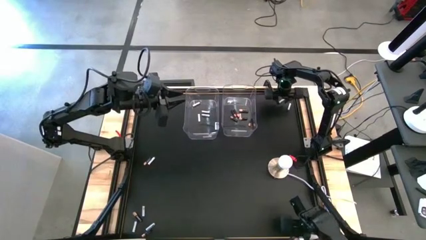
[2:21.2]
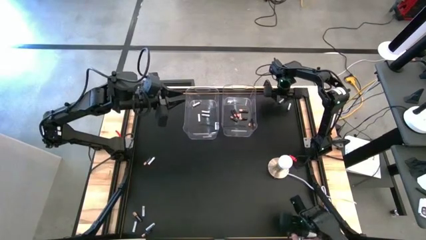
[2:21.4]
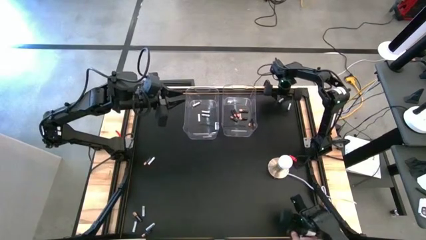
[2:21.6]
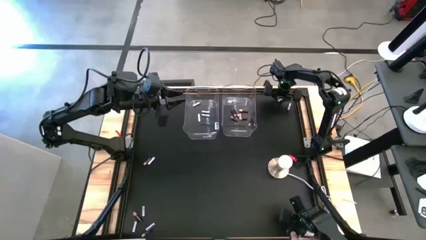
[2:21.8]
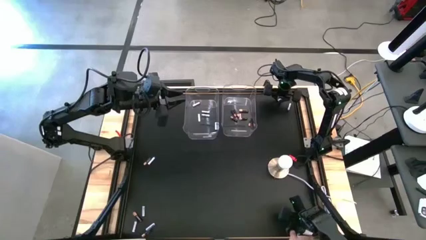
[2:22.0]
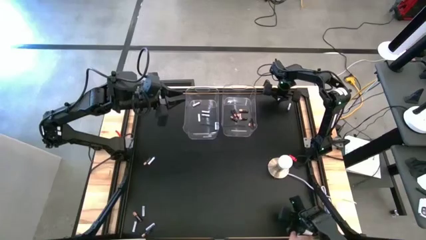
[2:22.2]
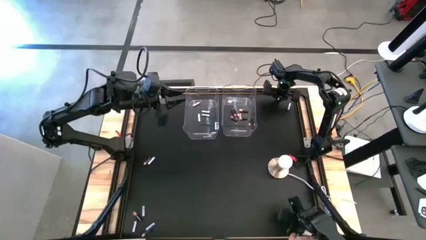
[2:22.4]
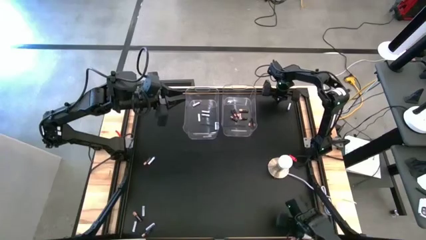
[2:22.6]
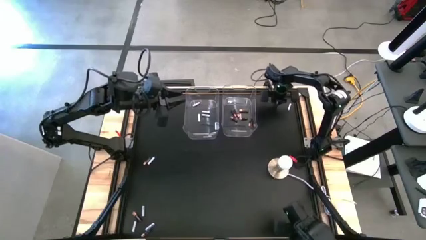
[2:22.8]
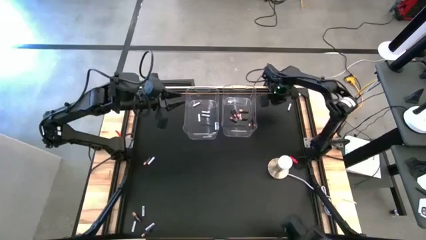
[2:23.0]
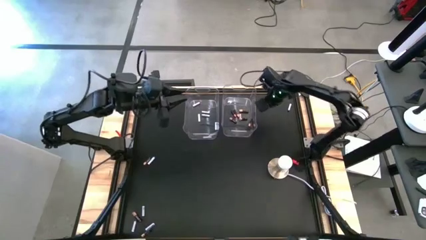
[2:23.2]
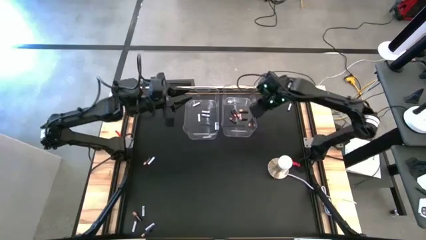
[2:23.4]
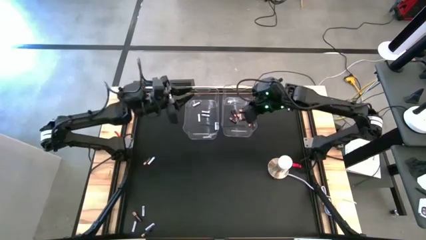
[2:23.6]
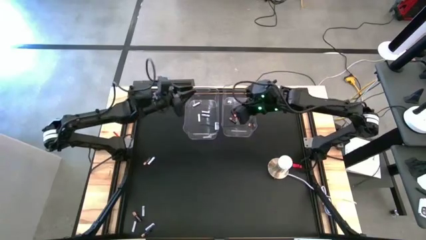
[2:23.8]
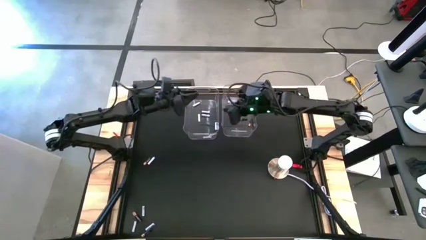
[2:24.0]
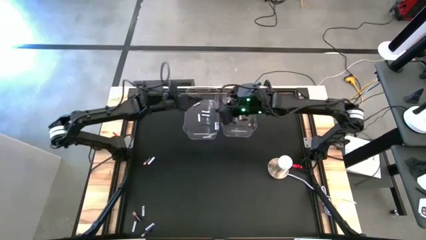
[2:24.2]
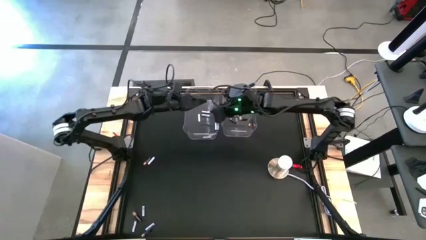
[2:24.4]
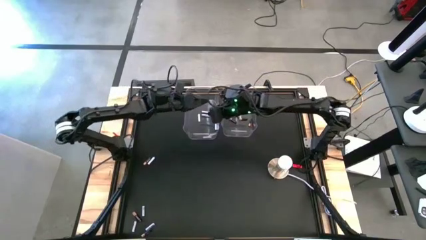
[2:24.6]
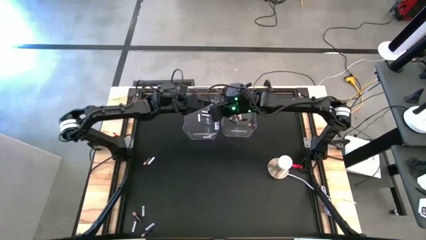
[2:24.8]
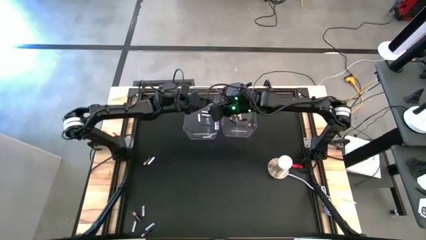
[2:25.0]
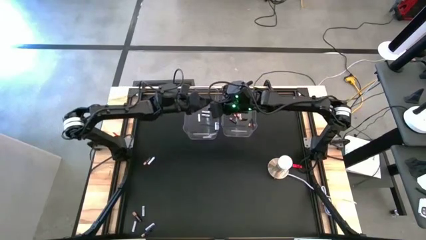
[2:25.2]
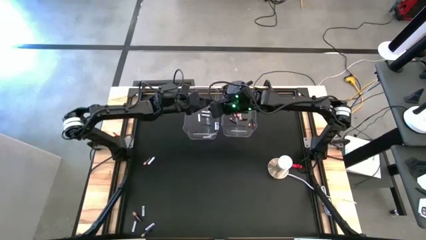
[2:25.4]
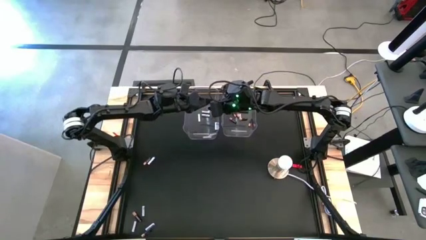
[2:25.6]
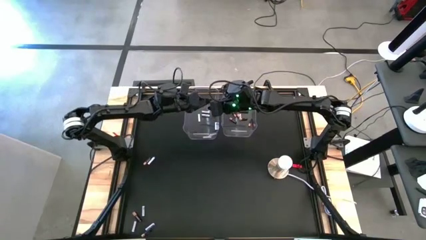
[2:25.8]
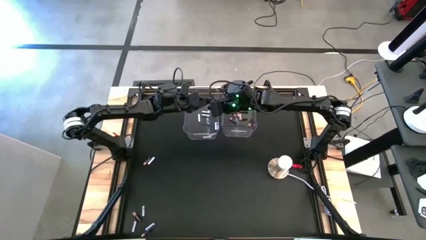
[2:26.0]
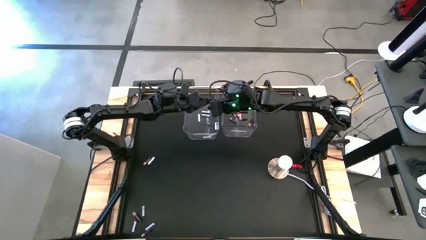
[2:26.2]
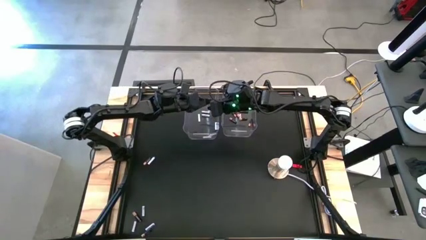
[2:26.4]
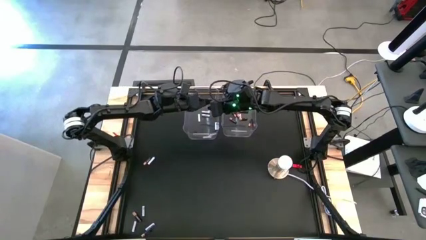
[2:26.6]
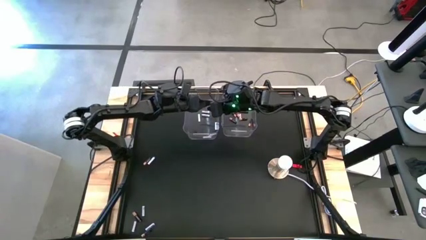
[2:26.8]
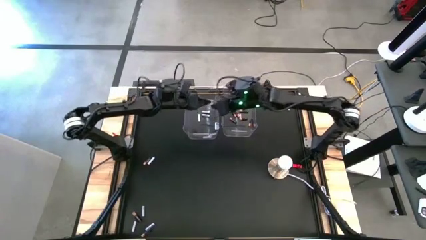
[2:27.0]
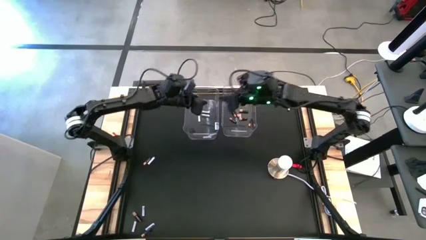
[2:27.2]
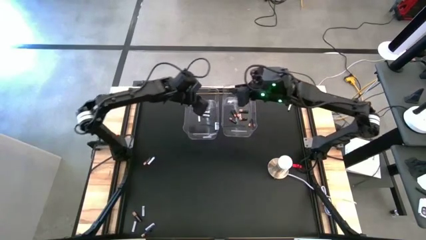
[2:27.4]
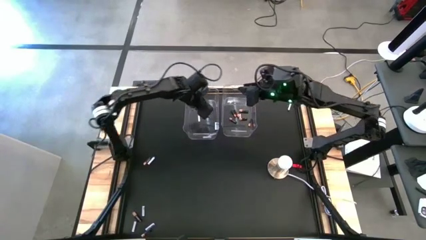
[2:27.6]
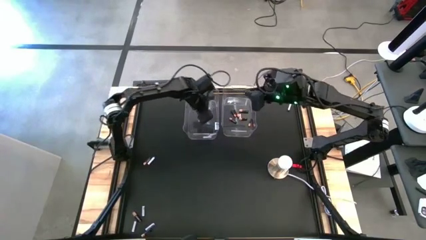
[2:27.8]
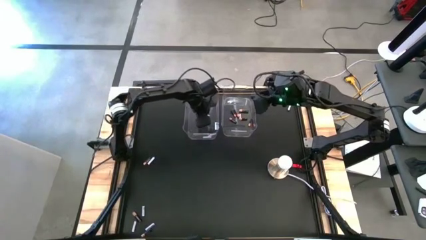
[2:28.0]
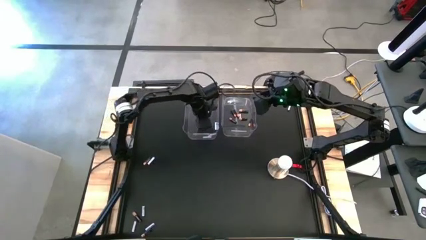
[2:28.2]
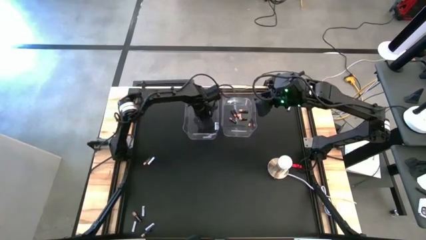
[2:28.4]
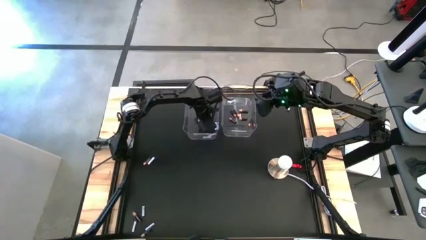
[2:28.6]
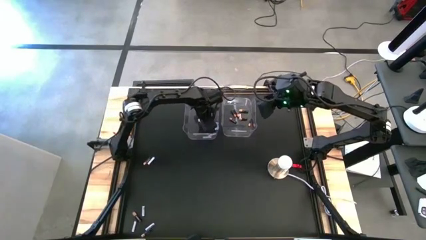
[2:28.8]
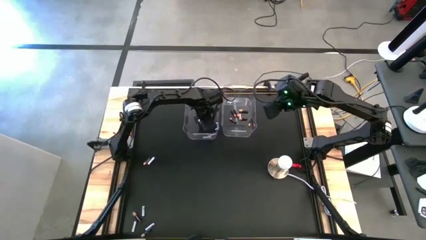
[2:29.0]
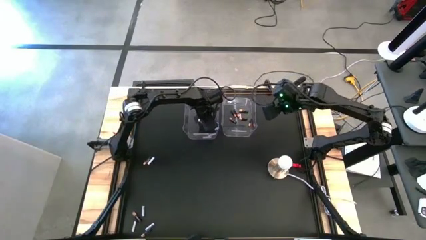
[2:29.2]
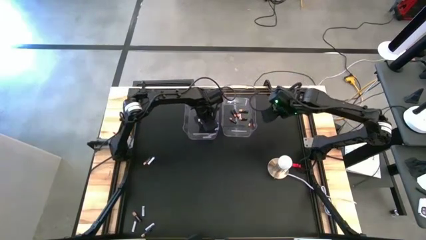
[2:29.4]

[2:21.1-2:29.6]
Task: Sort batteries
Put the white battery into the left transparent bin

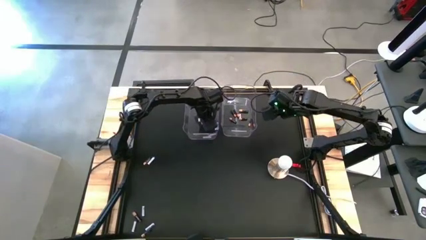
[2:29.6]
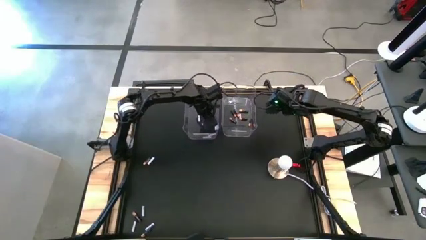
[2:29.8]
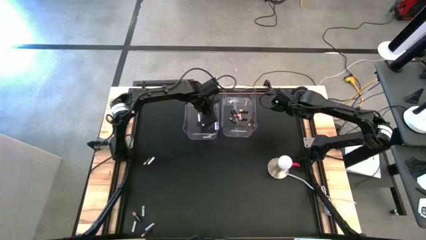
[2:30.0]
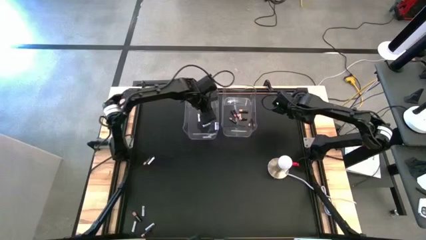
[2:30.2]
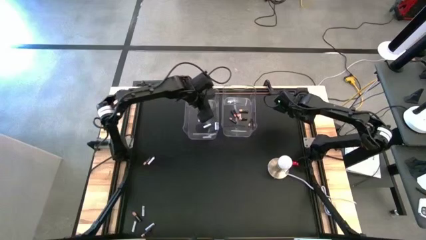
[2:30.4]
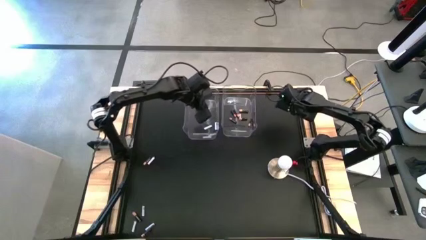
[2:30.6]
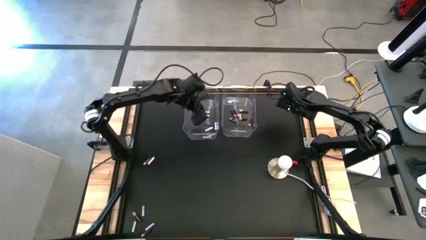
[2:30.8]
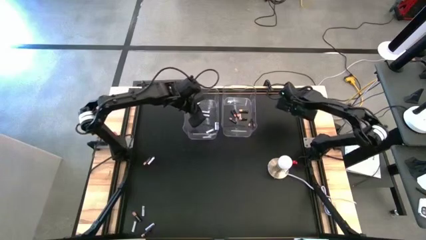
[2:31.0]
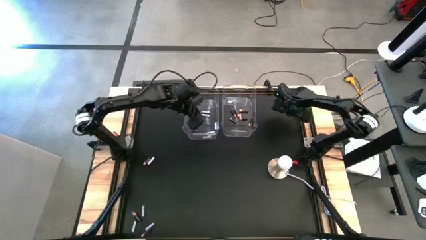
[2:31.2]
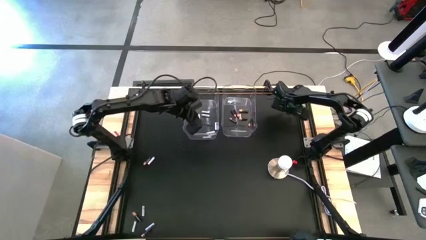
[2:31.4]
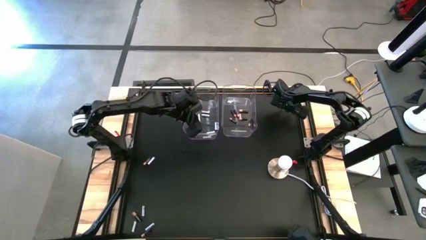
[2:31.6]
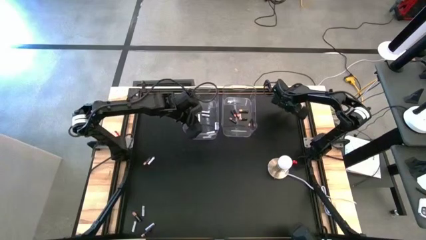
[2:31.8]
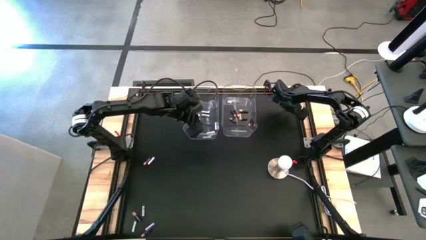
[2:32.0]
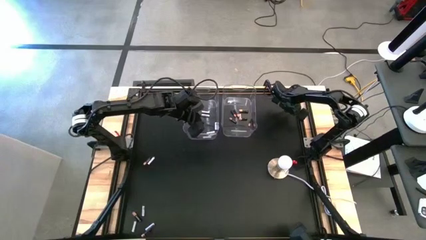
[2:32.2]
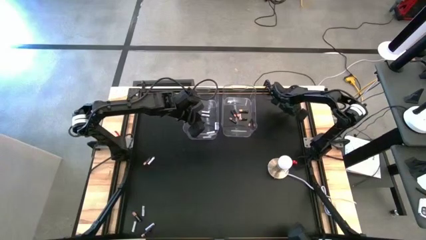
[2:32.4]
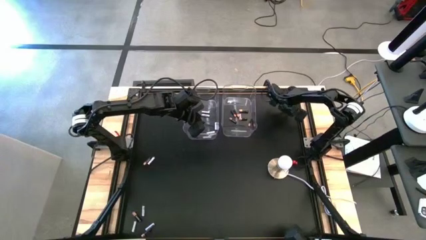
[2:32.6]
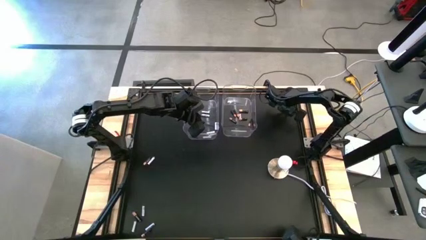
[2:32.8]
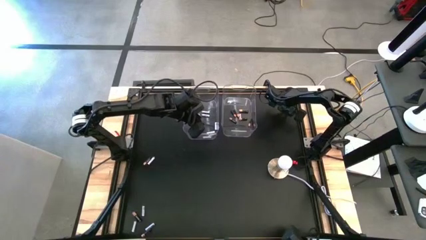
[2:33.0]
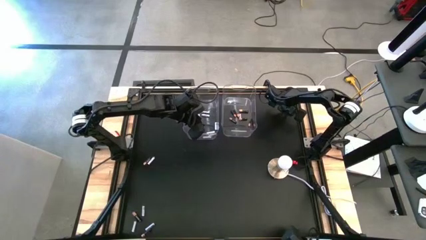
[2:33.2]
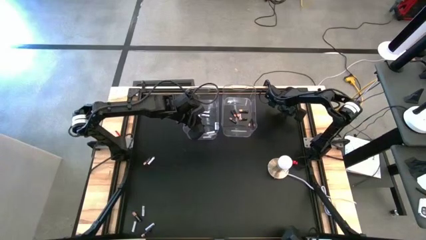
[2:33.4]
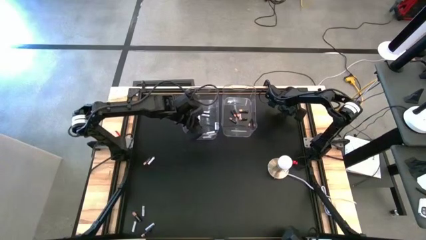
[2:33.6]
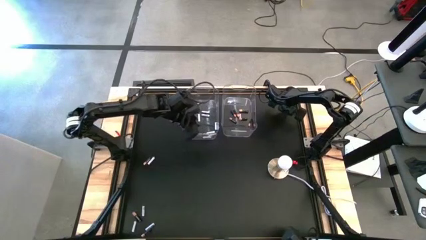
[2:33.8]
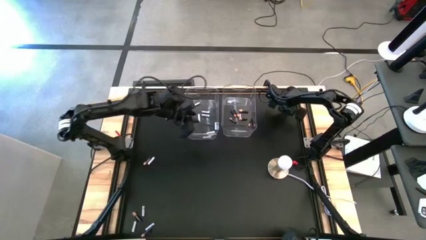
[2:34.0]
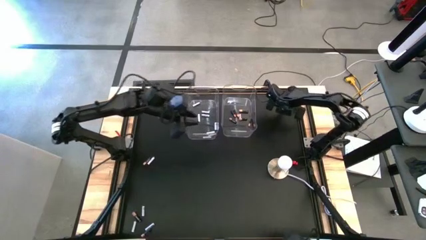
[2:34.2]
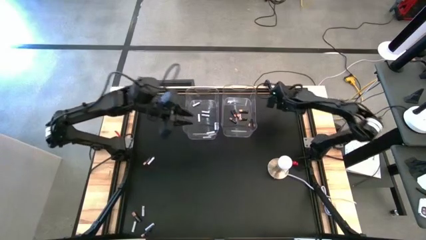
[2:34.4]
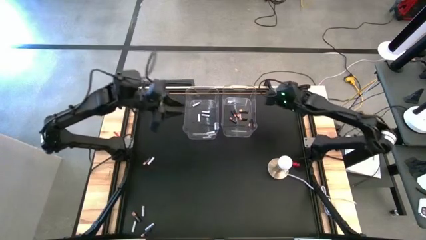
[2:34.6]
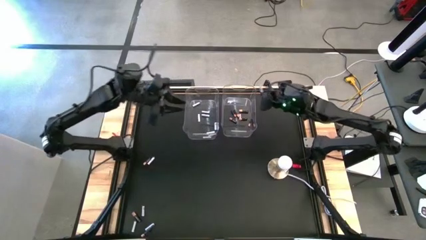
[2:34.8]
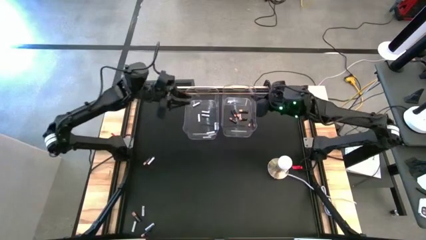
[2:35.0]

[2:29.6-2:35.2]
Put the white battery into the left transparent bin

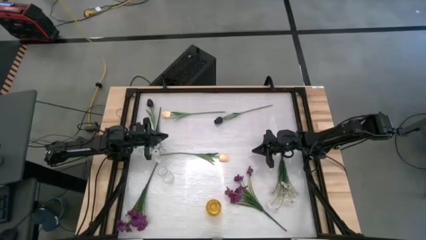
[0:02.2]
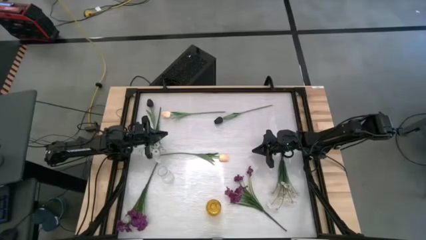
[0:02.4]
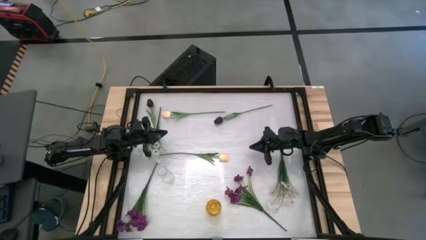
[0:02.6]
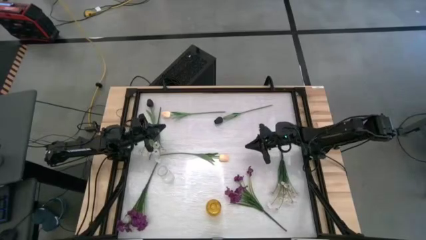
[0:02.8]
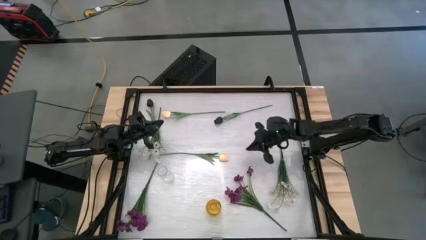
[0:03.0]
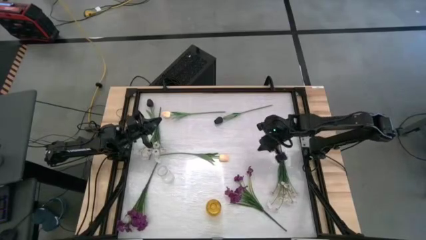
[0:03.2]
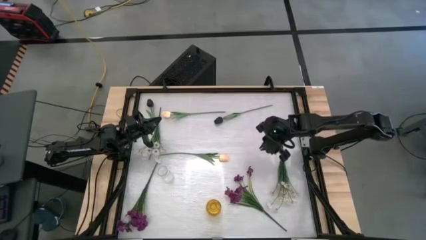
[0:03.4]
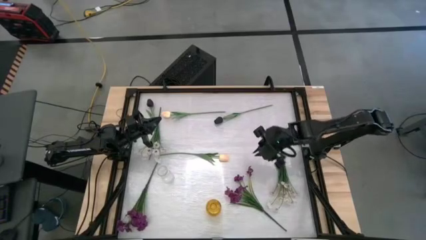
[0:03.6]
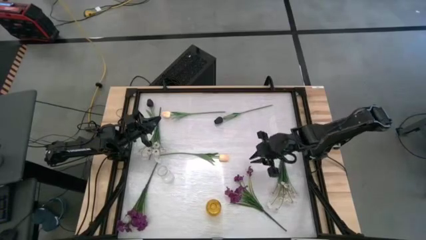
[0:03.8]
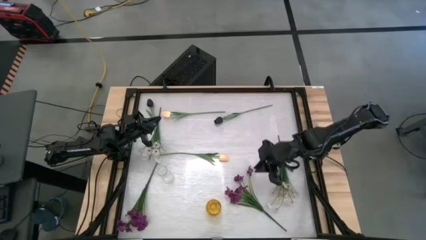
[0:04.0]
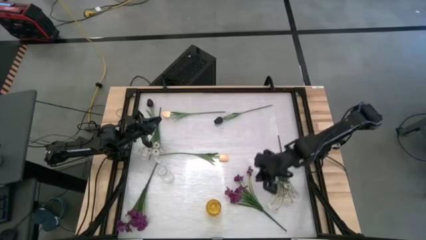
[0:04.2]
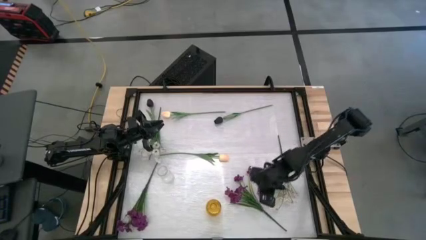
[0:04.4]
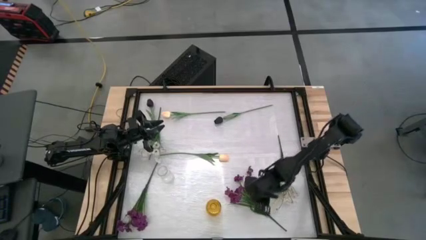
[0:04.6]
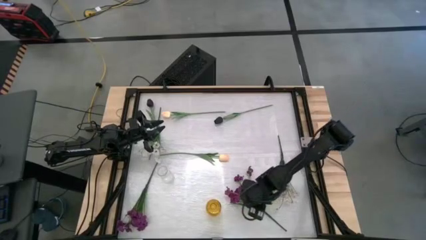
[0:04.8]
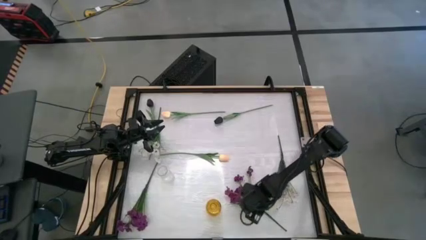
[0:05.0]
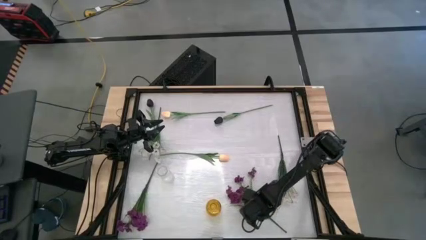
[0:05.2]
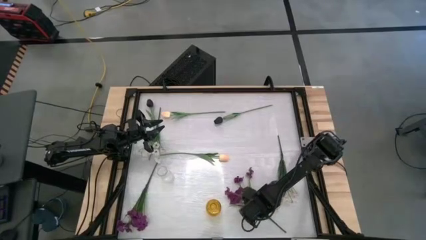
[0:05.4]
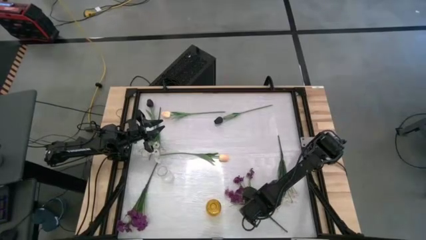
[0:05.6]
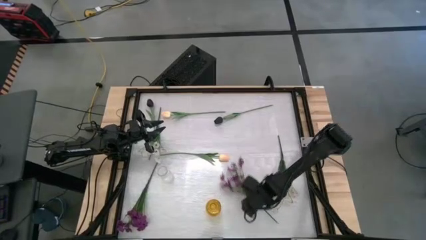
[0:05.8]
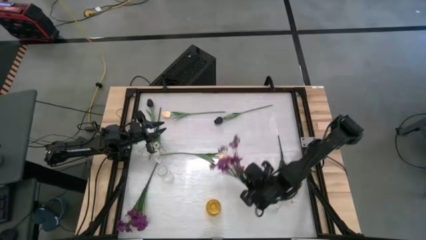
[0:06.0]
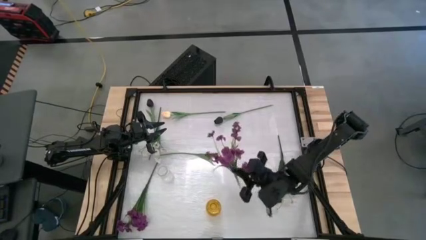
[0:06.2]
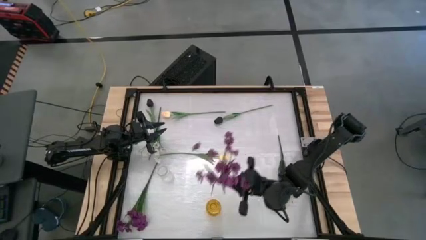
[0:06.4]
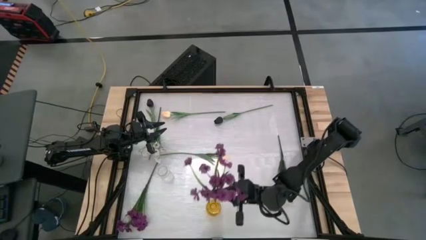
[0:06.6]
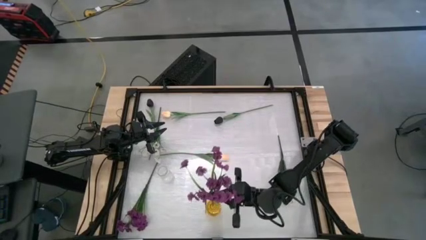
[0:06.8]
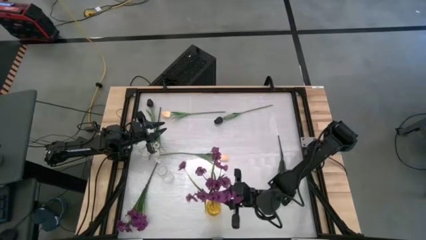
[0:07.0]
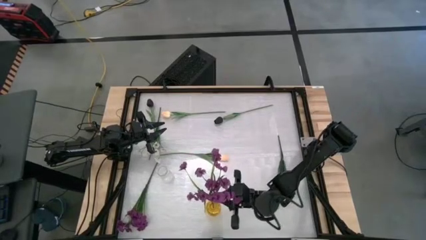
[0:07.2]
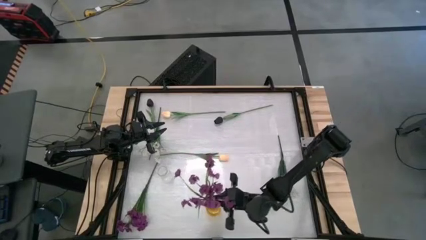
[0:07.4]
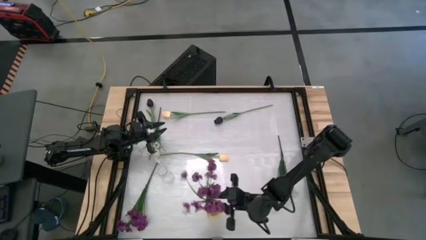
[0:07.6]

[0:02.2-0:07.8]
Task: Sort flowers into vase by color
Put the right purple flowers into the yellow vase
